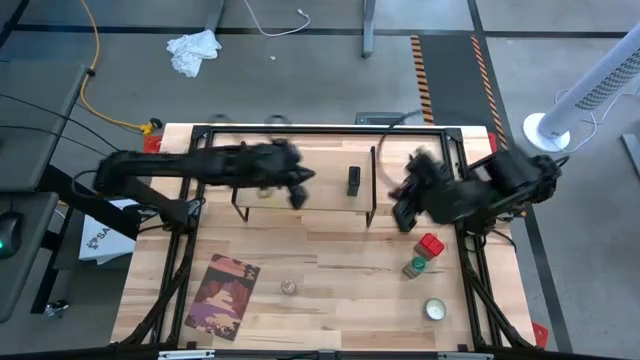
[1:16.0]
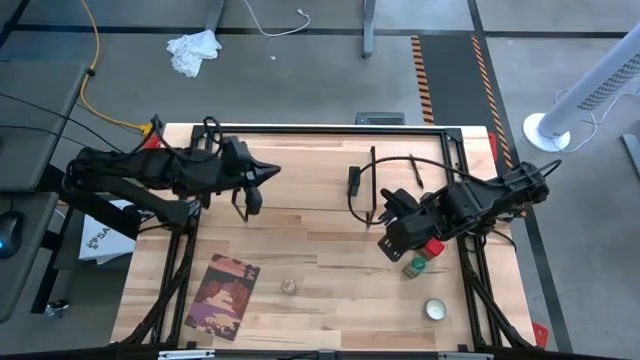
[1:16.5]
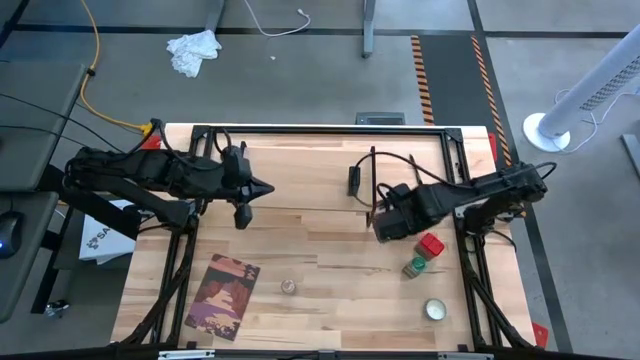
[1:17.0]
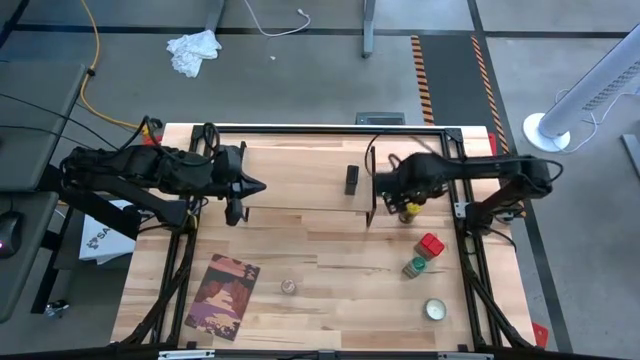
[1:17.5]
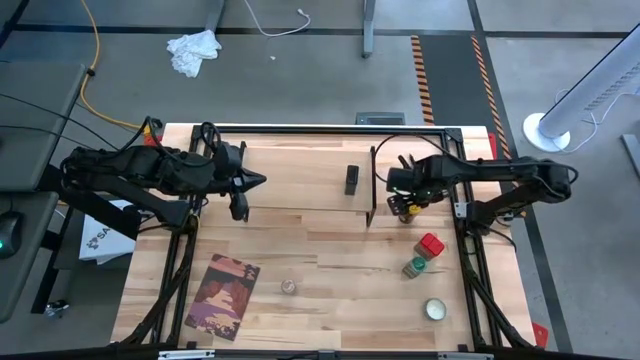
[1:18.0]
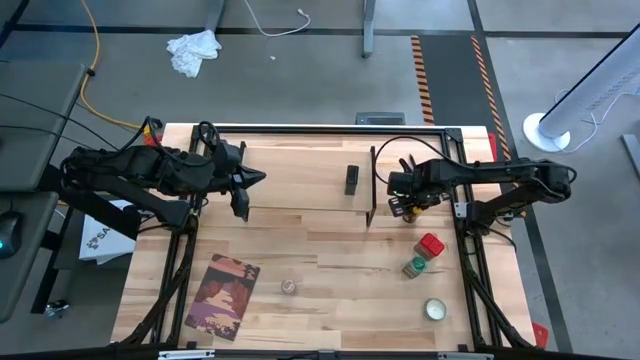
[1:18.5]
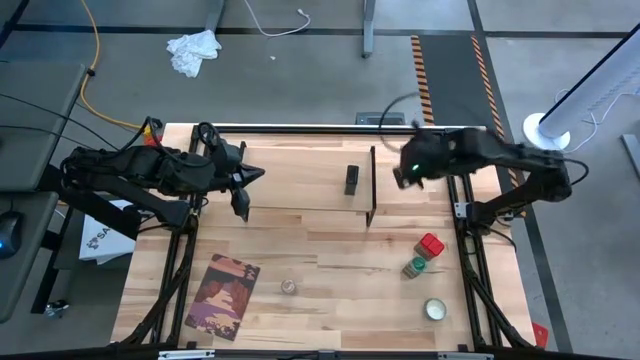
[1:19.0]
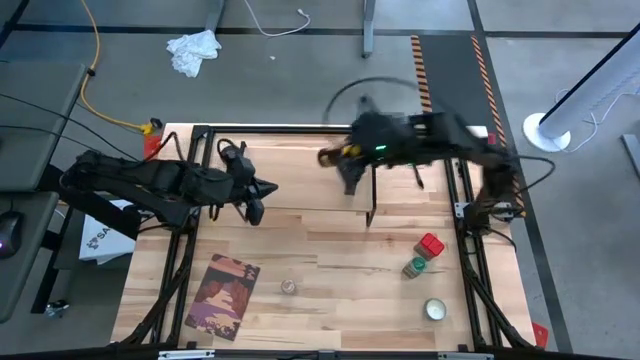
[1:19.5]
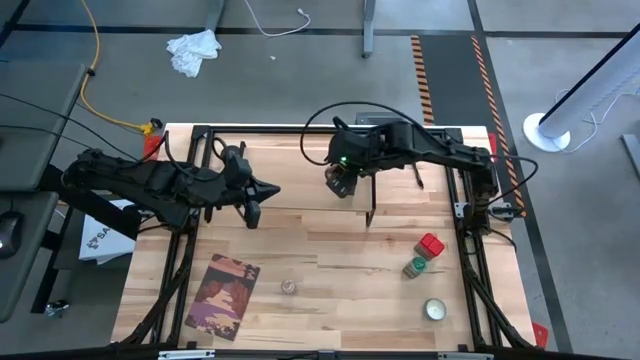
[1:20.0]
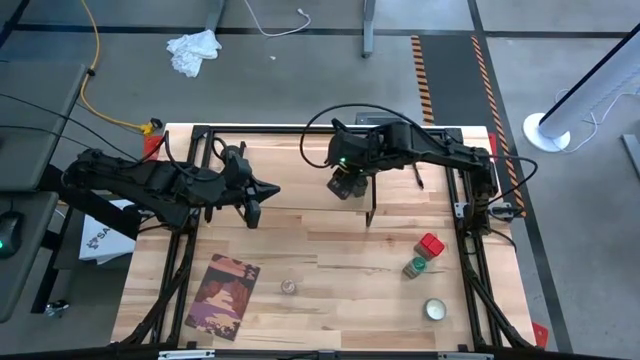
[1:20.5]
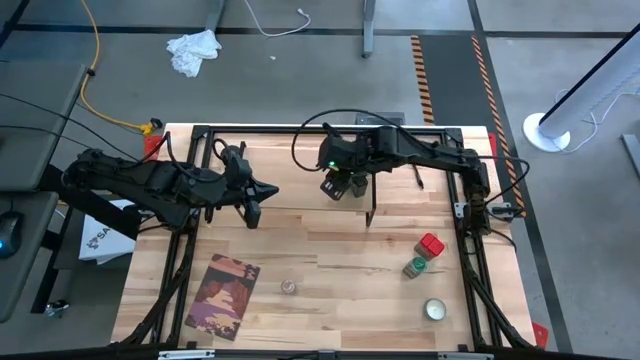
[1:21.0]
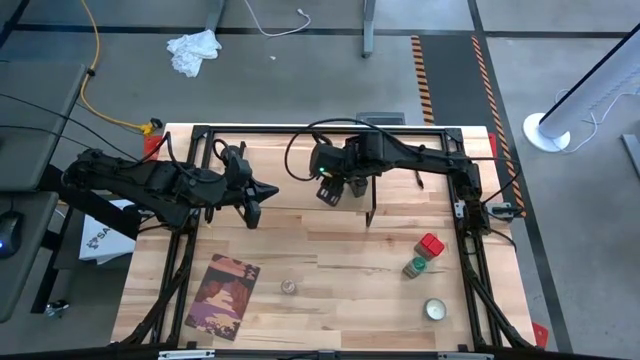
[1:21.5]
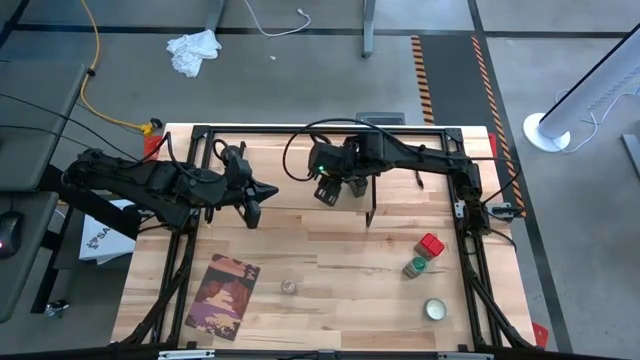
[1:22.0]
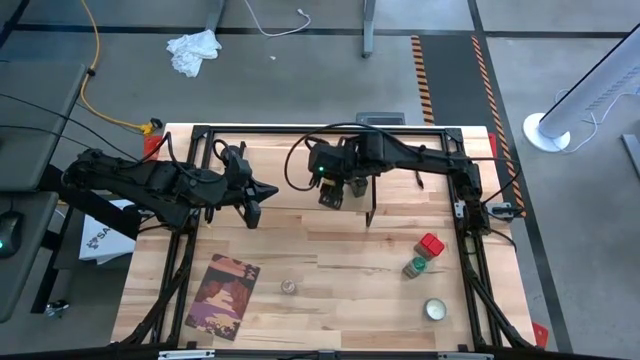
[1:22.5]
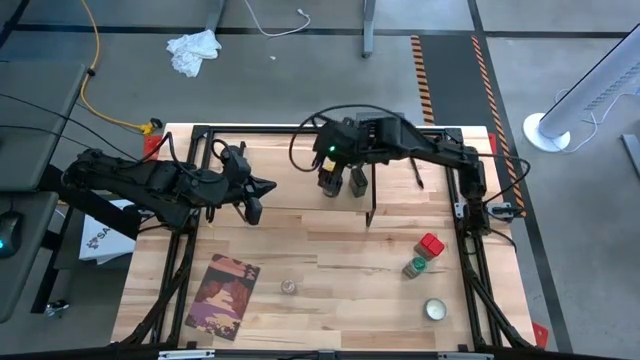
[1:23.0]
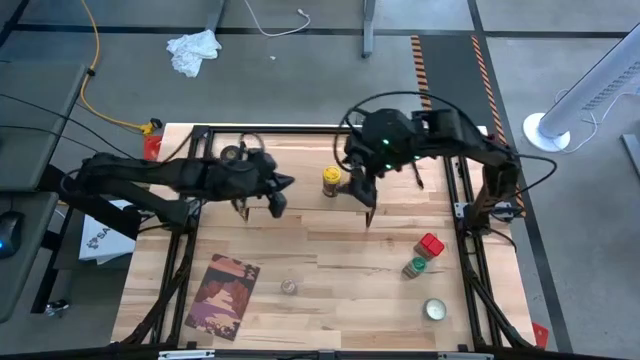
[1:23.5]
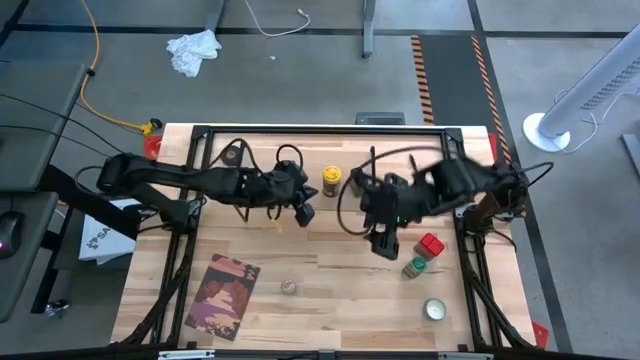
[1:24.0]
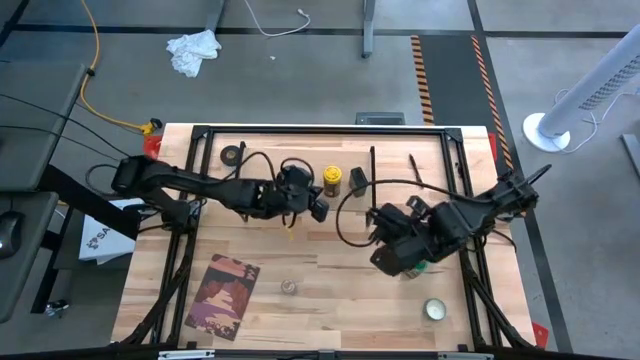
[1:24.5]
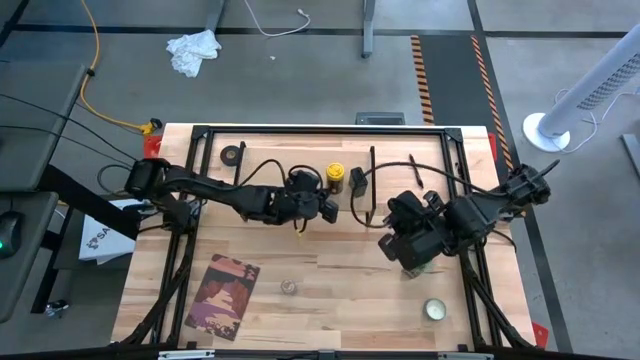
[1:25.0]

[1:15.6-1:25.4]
Task: Shelf spices
Put the yellow seasoning can on the shelf

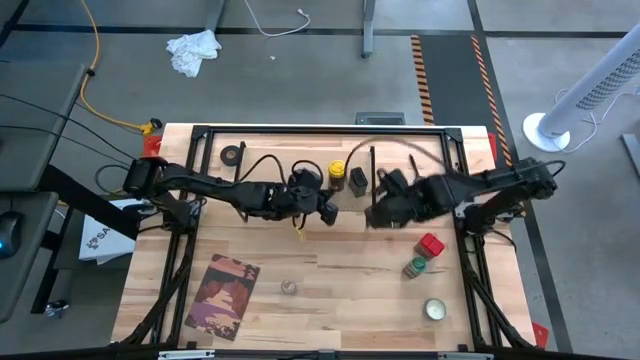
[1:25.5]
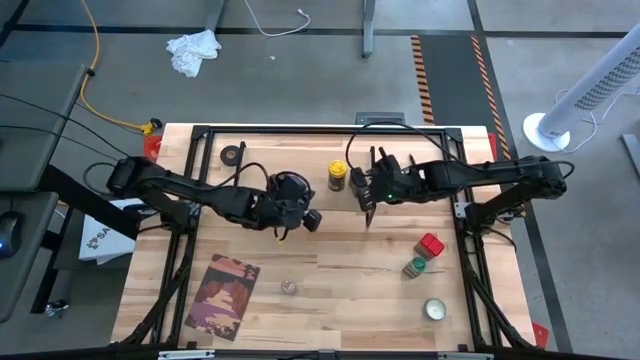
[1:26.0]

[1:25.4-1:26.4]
Adjust the black seasoning can

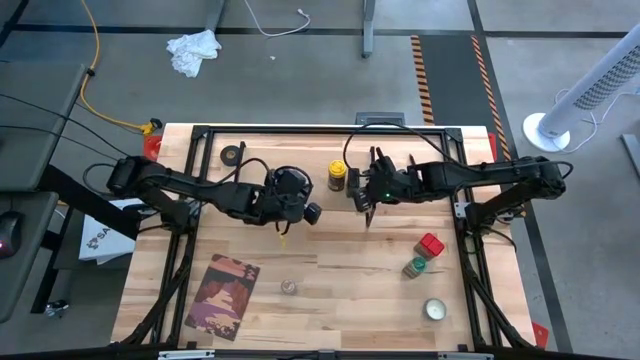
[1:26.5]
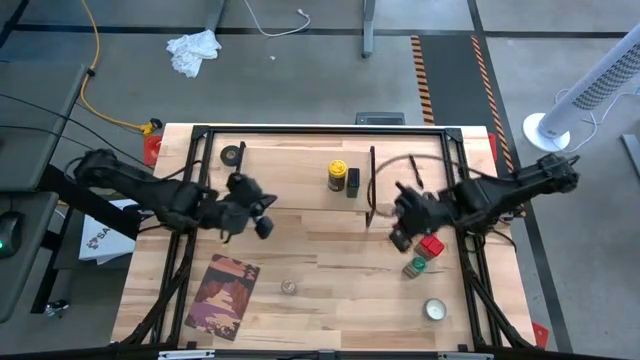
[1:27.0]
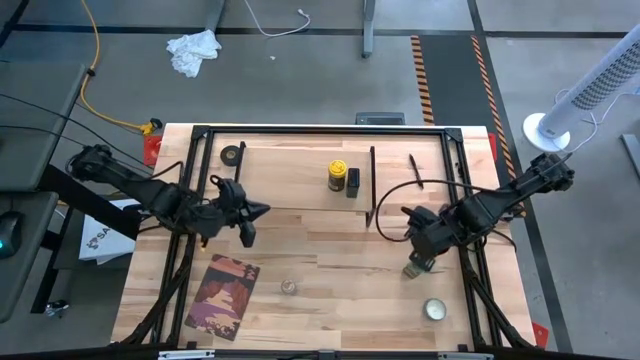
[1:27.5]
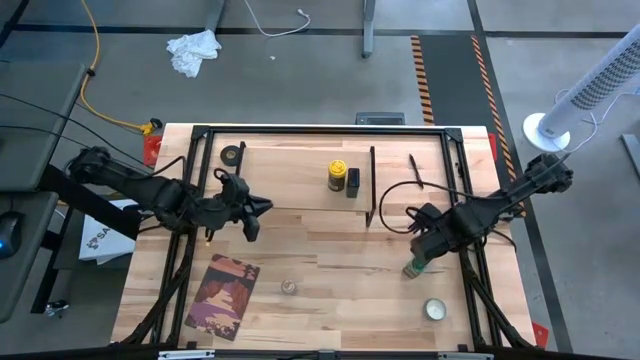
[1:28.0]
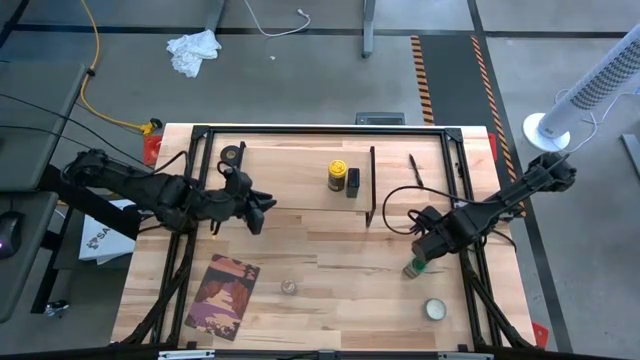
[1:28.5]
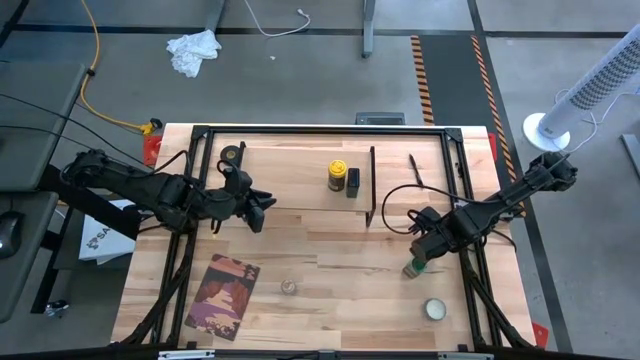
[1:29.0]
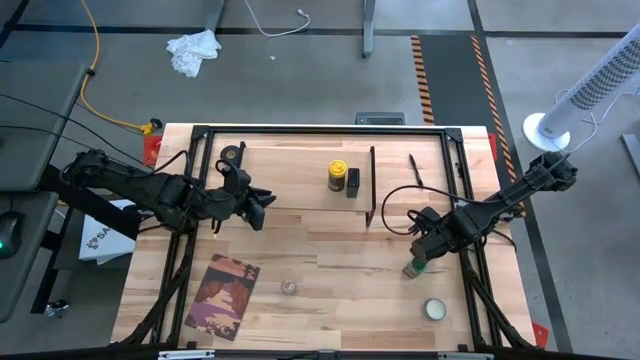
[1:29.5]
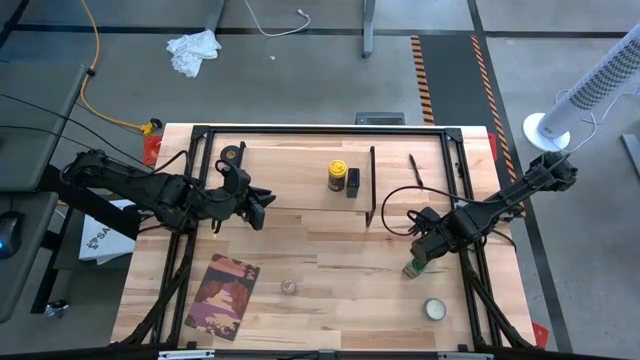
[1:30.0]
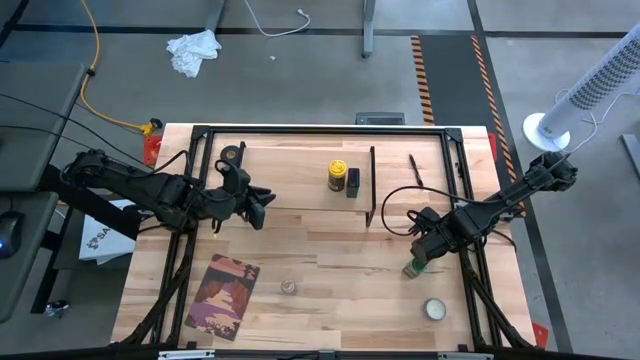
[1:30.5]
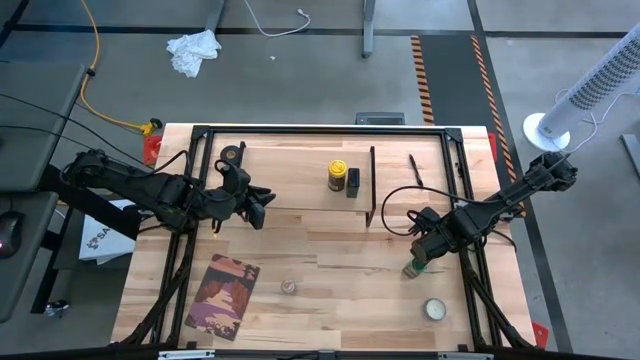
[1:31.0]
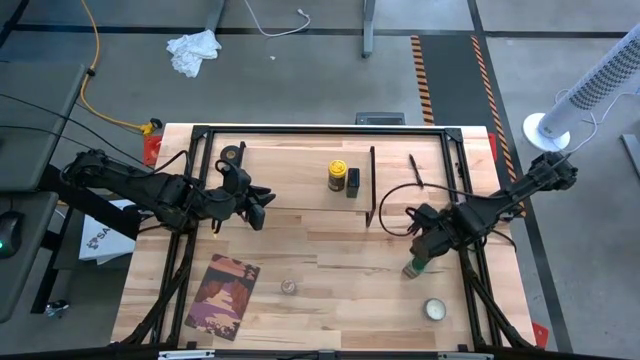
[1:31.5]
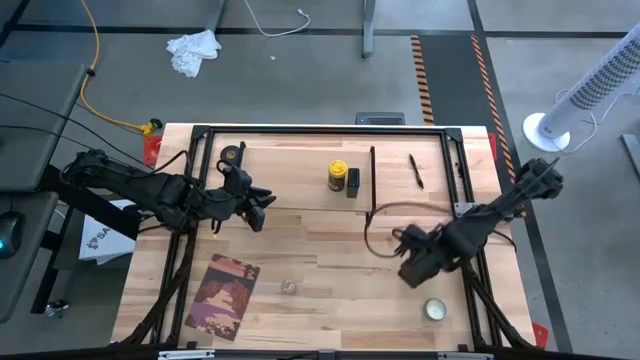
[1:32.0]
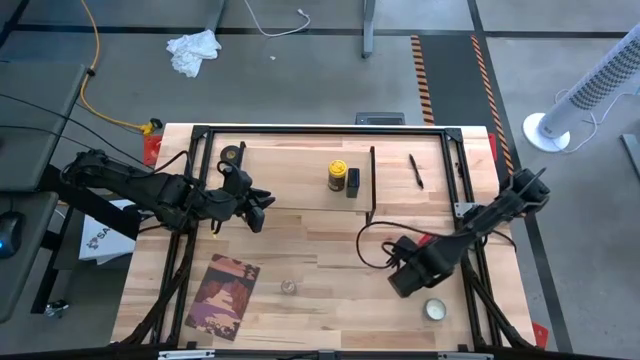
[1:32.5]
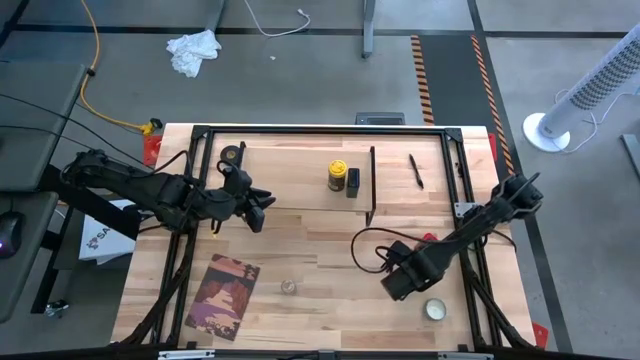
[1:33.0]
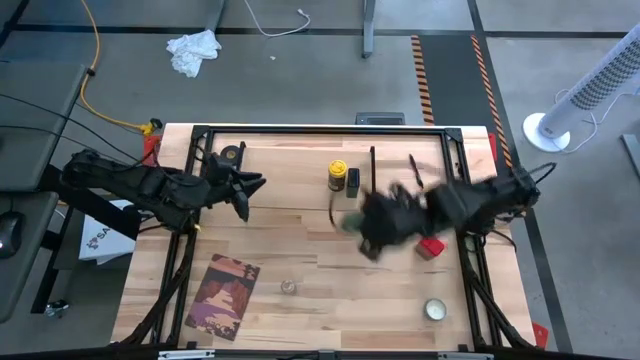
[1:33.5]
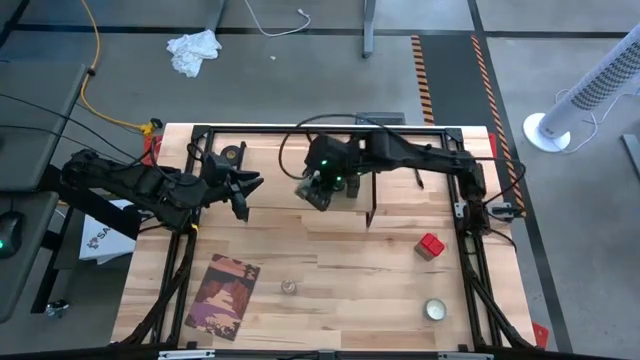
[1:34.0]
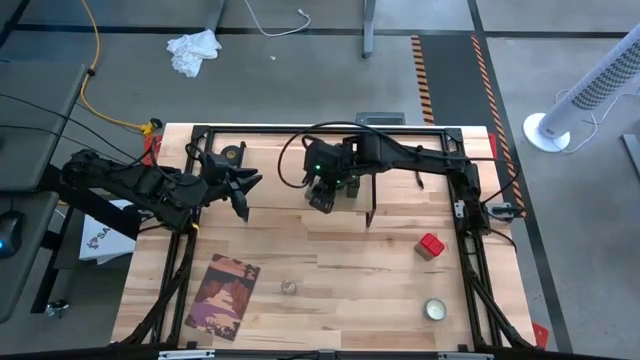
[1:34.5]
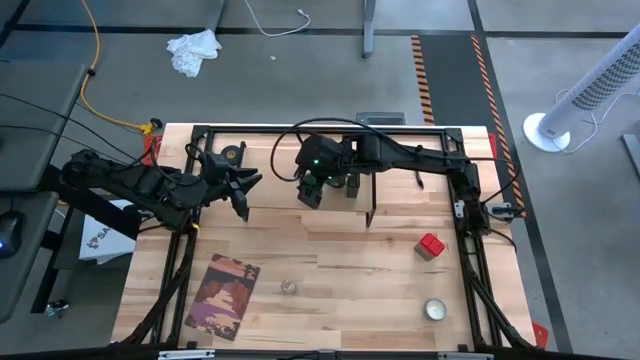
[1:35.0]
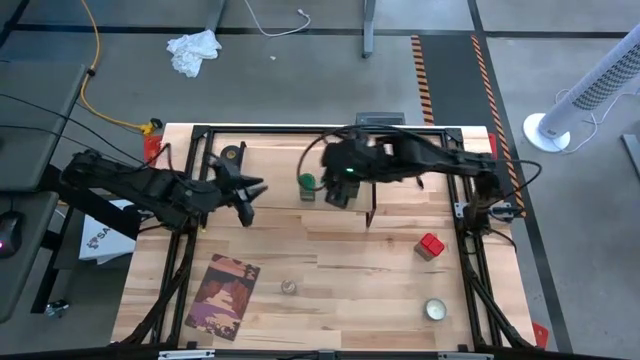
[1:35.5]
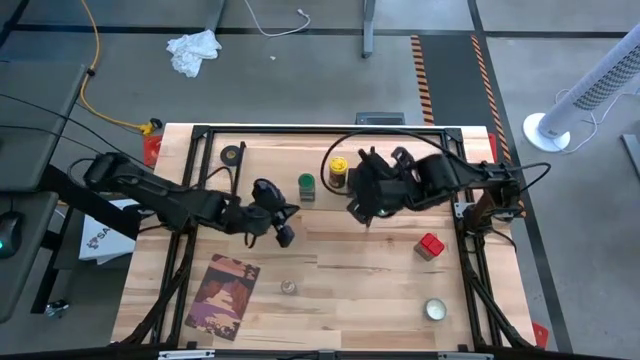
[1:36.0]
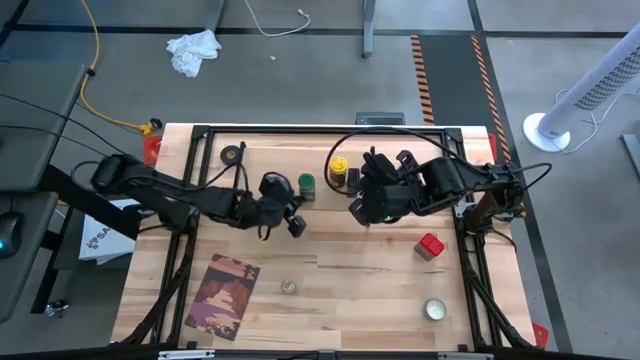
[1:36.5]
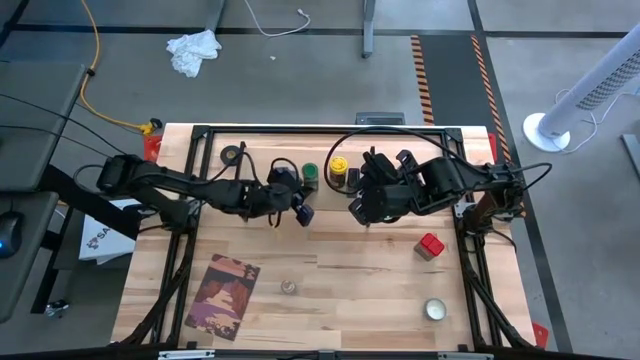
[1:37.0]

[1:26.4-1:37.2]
Put the green seasoning bottle on the shelf
